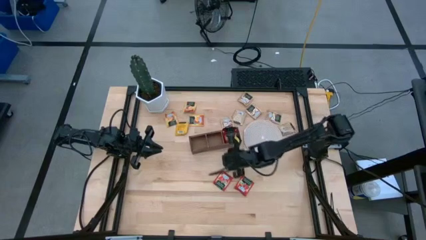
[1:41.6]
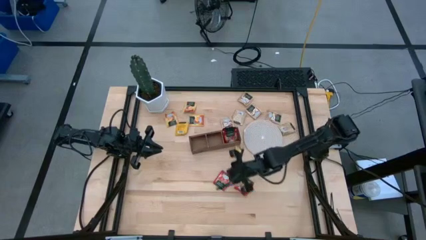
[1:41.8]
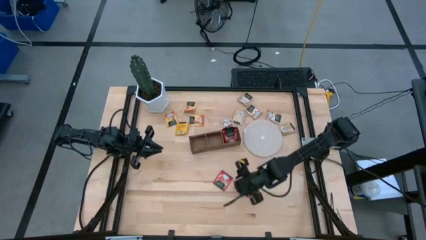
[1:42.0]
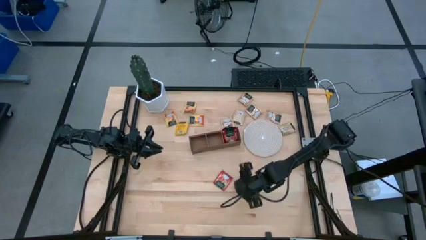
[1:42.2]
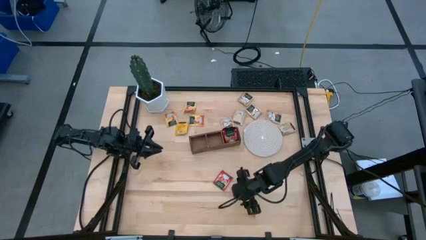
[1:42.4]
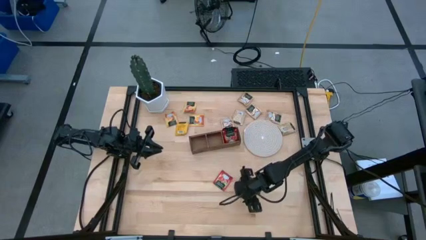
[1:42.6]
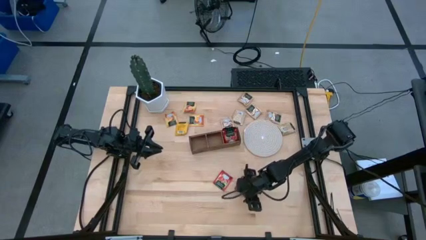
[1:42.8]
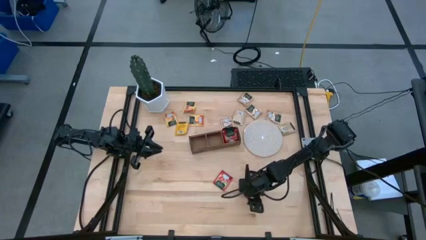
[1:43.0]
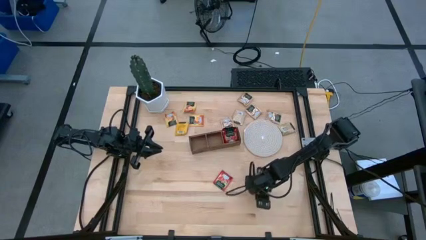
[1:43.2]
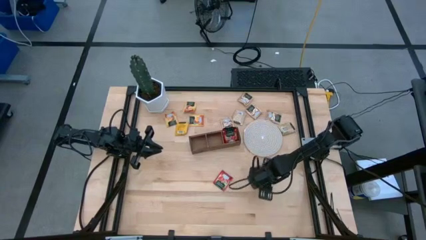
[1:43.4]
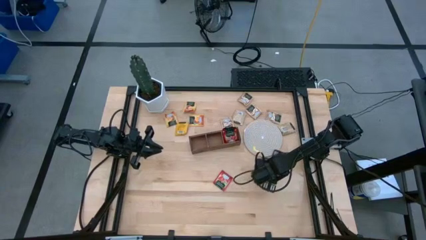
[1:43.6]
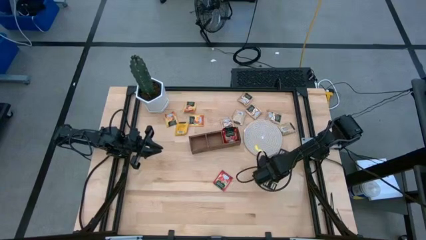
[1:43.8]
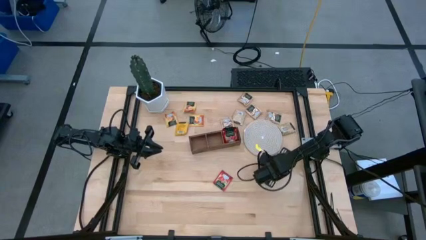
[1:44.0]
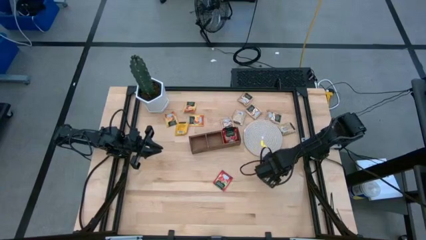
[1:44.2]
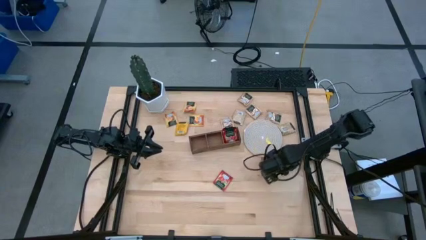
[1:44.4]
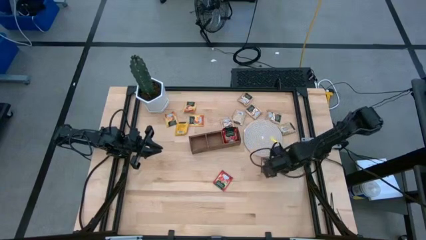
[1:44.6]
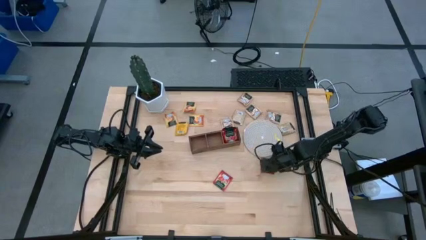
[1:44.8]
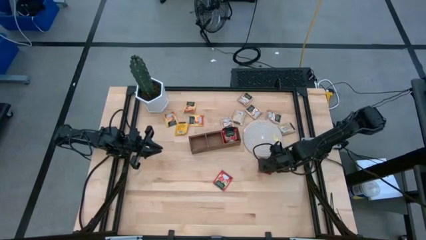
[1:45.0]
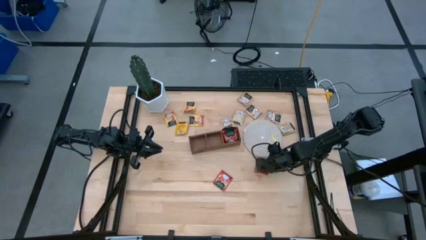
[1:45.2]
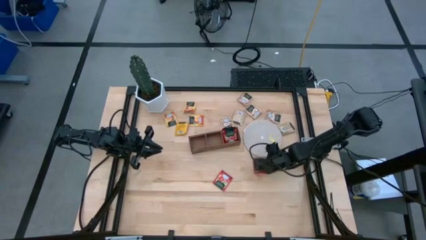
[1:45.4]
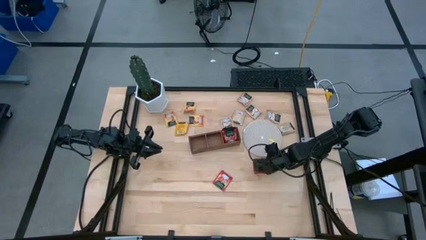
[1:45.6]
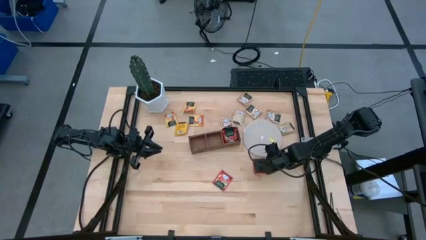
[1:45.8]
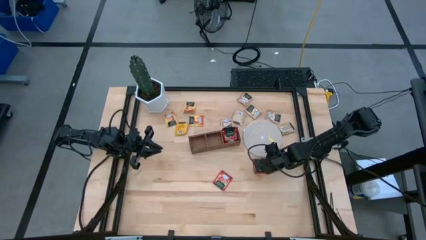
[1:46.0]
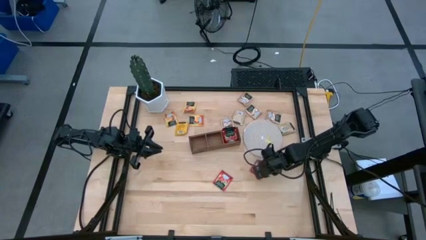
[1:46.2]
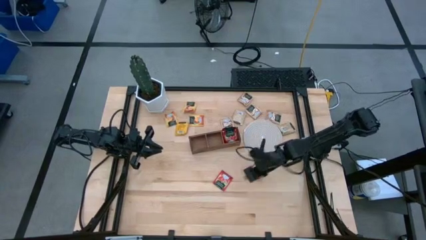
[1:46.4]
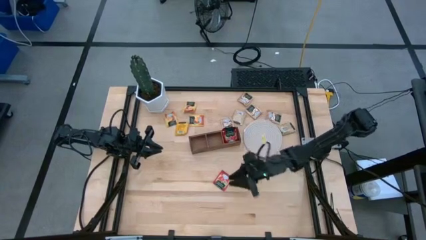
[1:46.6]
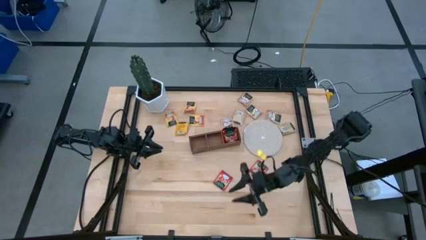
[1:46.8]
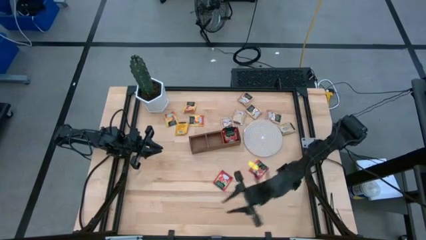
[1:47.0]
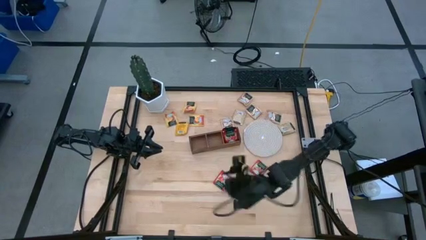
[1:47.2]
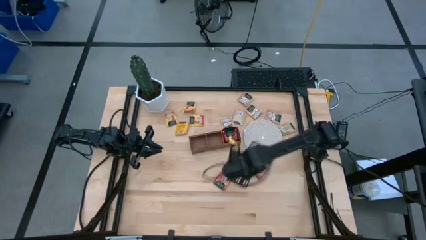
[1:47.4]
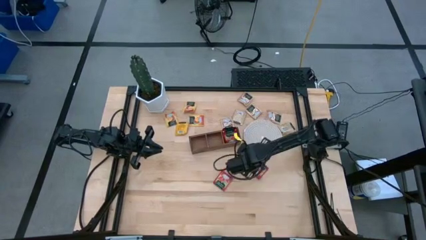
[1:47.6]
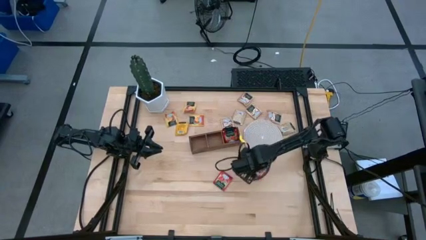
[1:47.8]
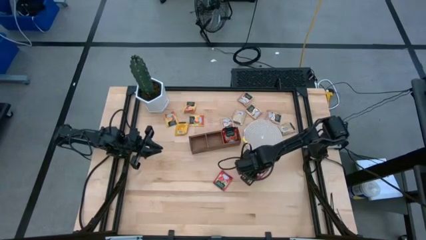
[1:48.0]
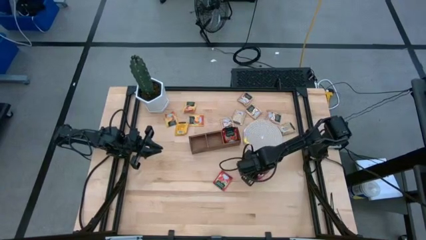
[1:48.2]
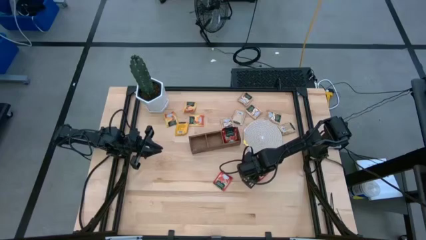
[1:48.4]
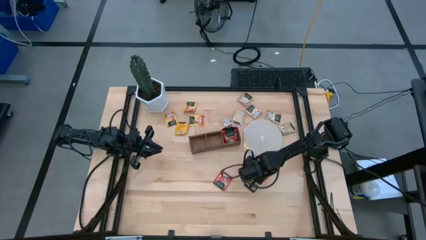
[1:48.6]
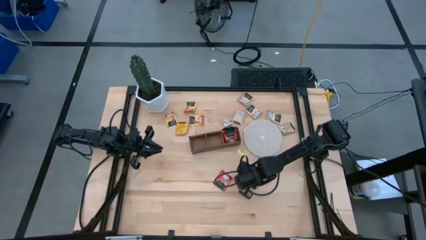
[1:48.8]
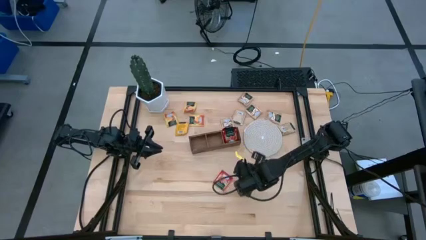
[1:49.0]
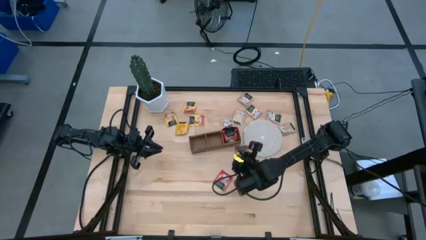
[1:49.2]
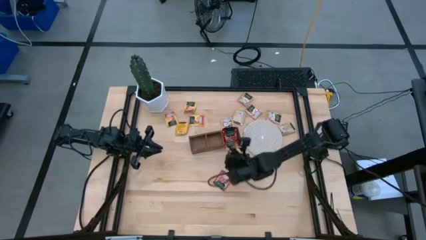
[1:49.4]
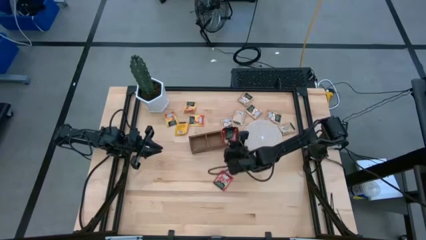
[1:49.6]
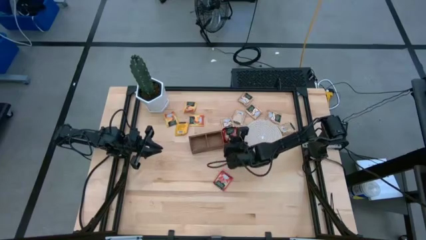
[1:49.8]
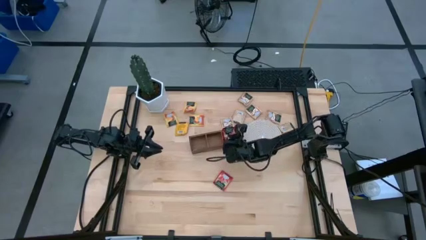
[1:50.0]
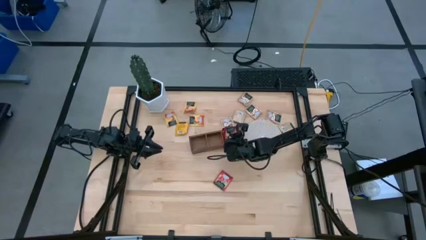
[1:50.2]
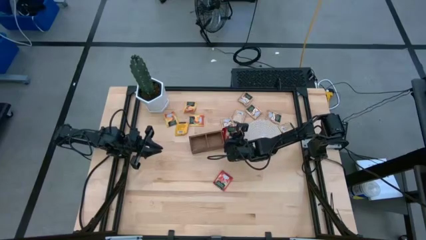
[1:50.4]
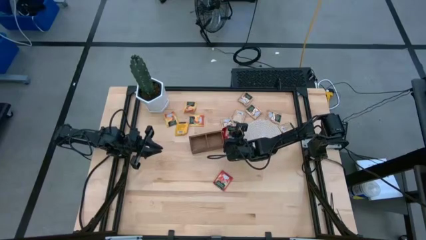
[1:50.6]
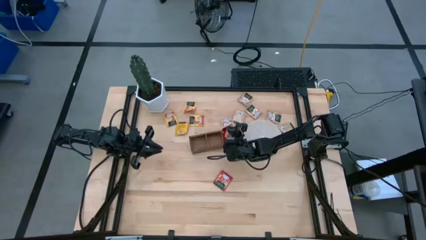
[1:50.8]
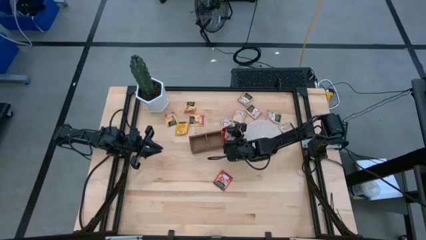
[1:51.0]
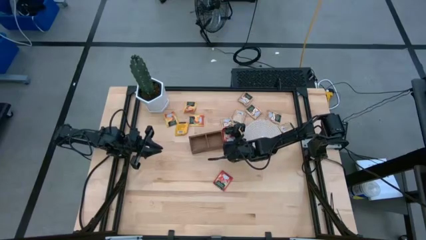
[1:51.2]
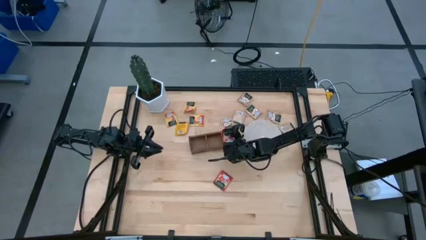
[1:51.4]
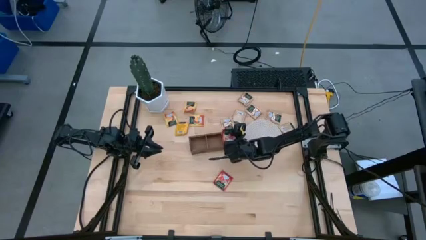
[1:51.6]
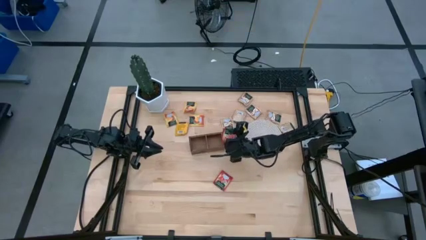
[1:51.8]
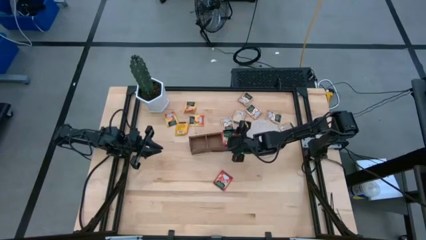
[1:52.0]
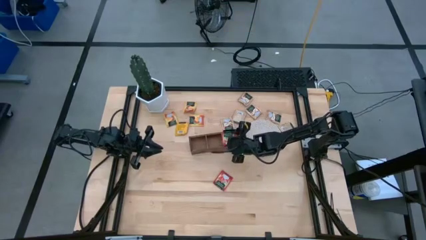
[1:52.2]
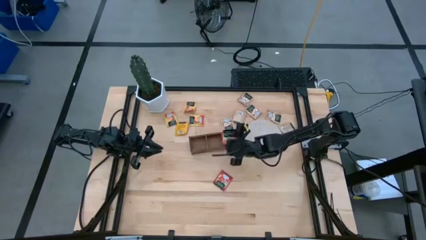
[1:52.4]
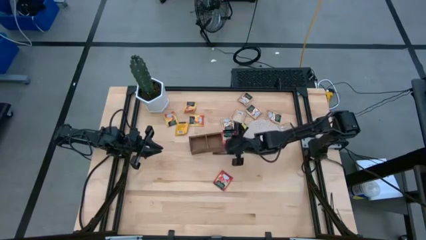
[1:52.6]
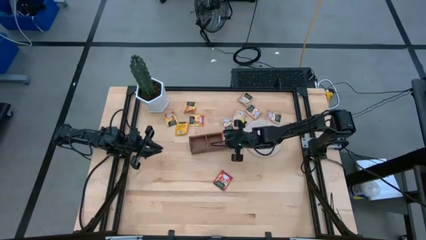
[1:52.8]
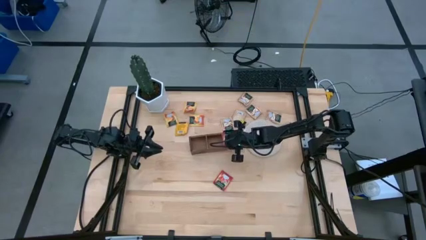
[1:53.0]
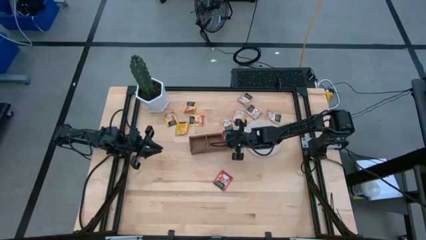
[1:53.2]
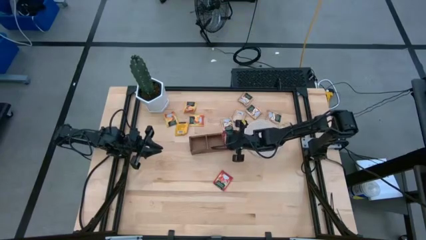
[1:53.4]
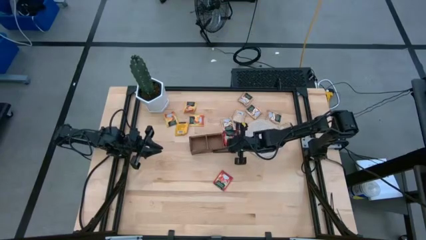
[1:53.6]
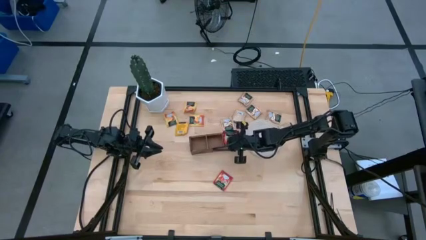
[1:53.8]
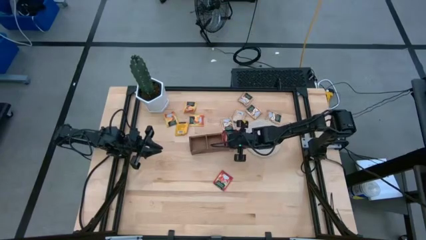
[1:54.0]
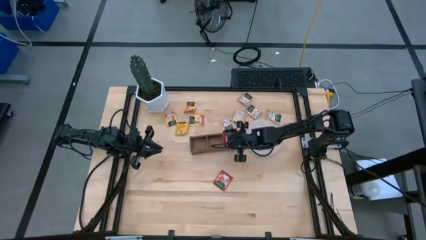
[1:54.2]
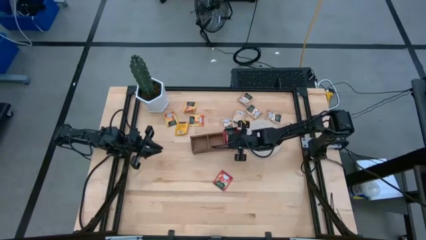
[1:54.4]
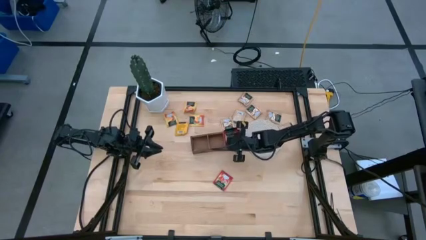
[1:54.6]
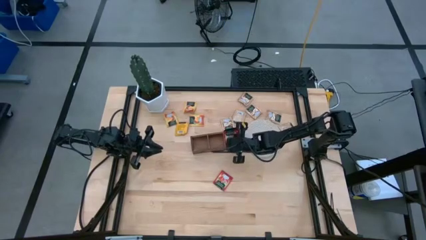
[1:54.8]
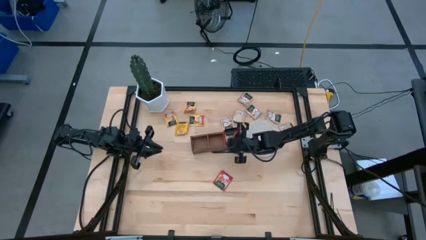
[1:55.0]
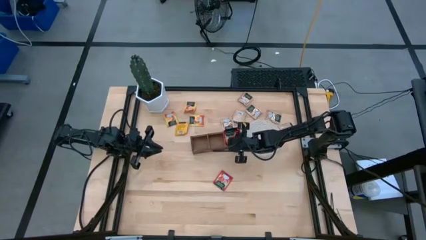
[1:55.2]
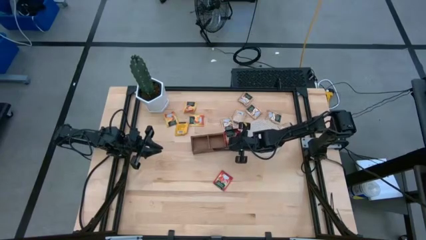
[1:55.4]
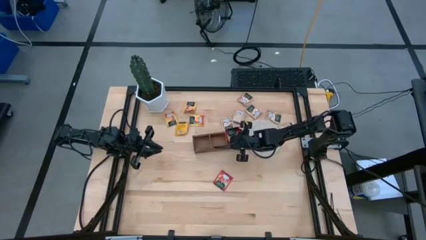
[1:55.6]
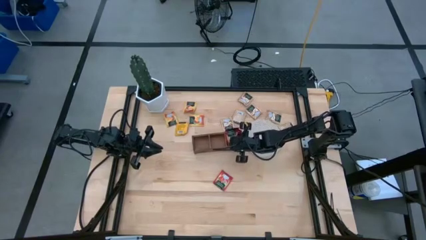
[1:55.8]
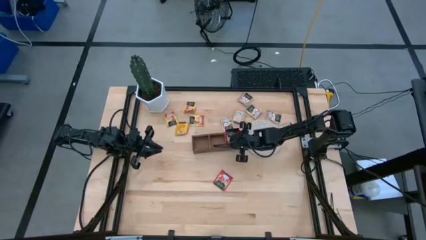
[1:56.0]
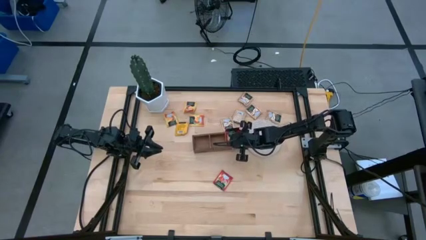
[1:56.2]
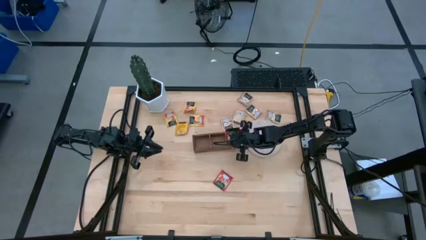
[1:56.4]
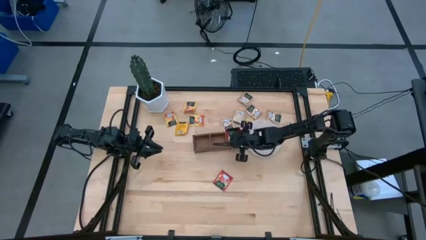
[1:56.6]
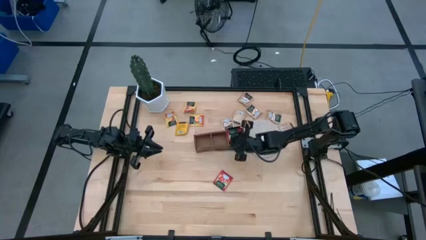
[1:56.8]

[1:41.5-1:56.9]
Task: Pick & Place Tea
Put the red tea bag into the right section of the wooden organizer

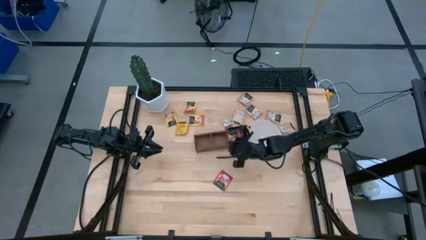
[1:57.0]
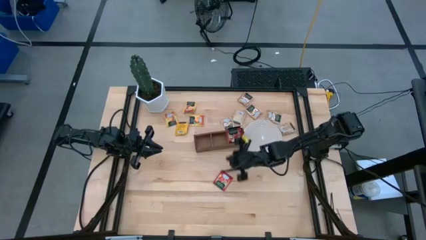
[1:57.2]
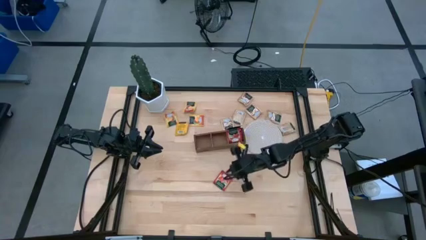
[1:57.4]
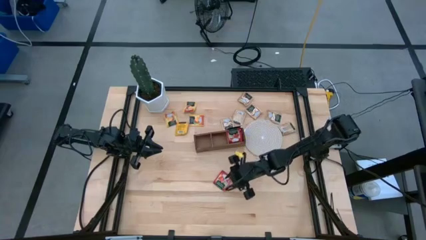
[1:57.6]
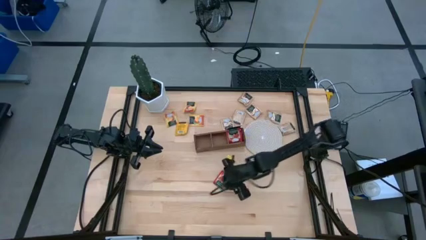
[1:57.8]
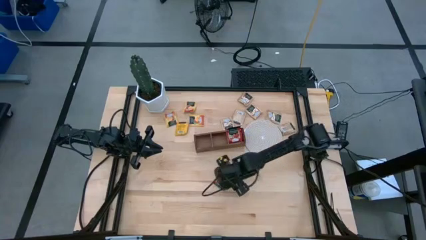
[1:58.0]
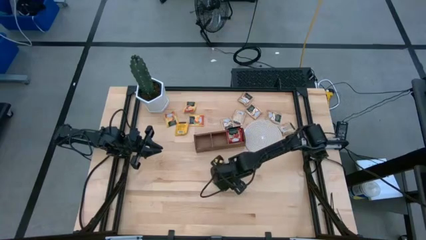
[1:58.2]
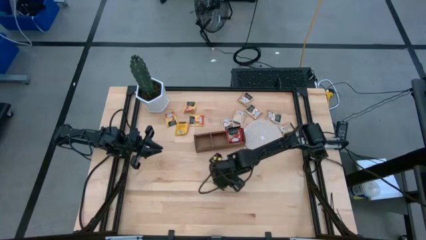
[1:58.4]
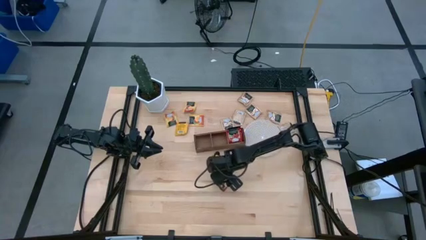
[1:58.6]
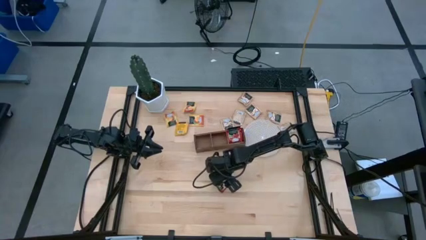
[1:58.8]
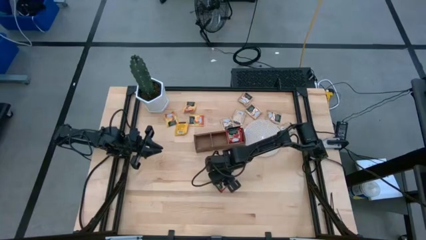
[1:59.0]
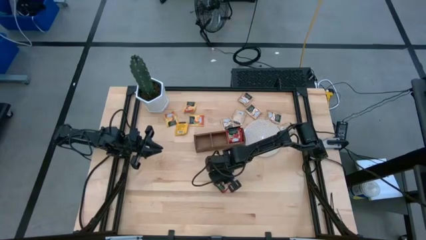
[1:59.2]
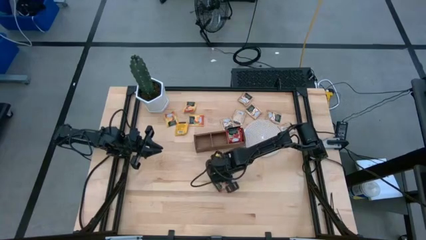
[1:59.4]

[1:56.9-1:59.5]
Put the red tea bag into the right section of the wooden organizer
